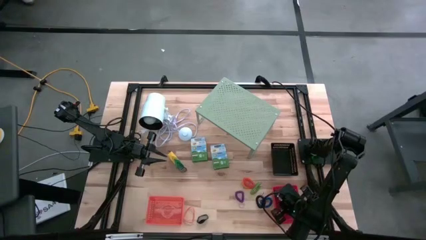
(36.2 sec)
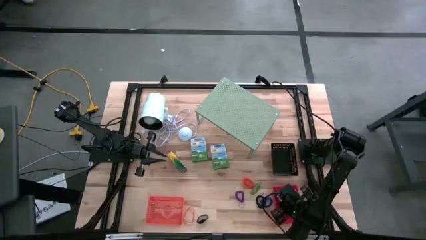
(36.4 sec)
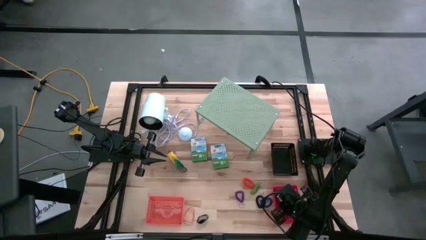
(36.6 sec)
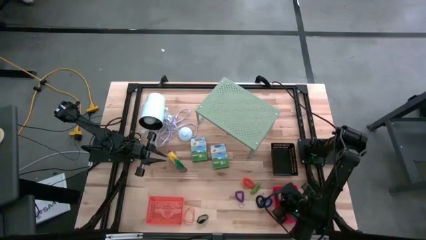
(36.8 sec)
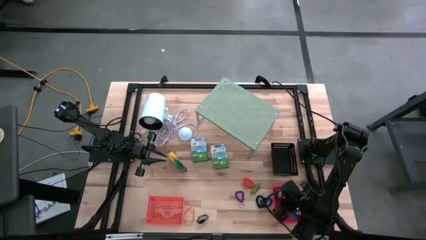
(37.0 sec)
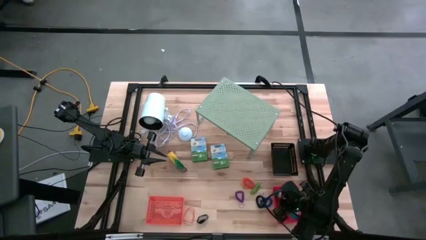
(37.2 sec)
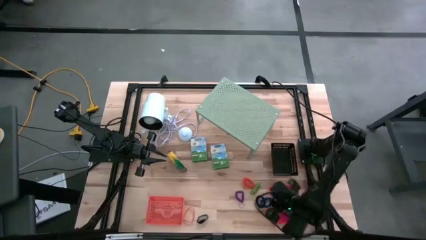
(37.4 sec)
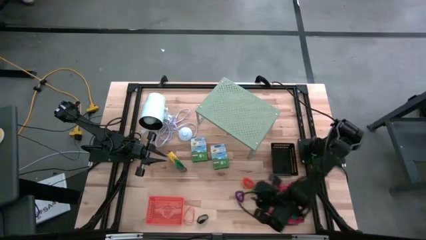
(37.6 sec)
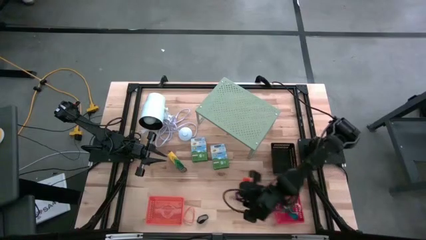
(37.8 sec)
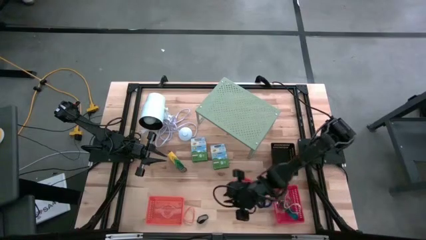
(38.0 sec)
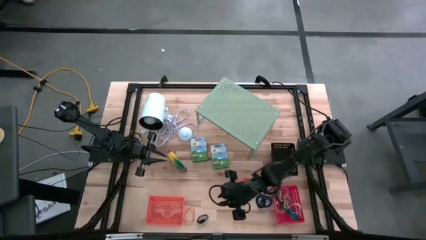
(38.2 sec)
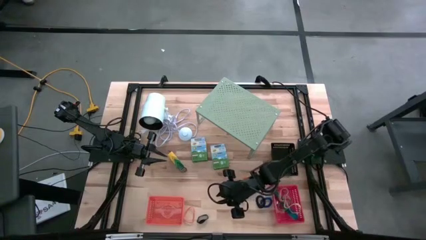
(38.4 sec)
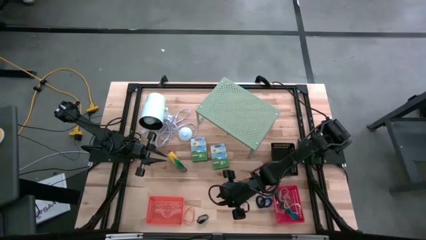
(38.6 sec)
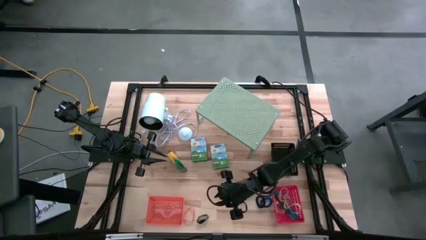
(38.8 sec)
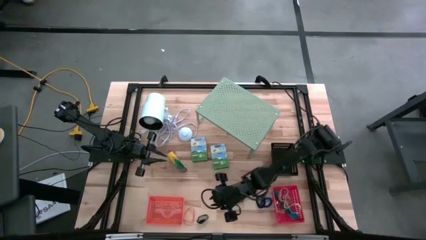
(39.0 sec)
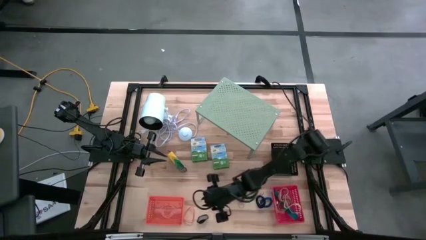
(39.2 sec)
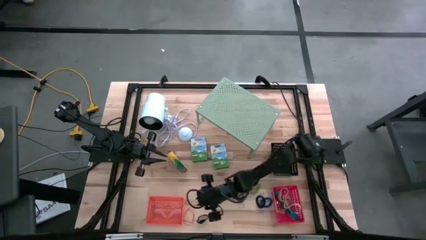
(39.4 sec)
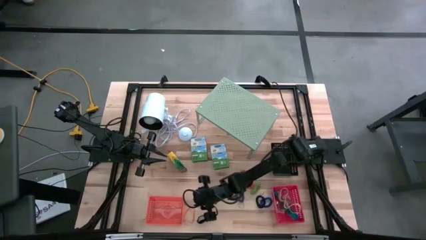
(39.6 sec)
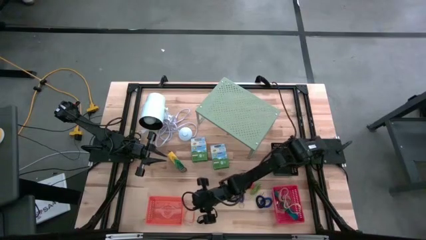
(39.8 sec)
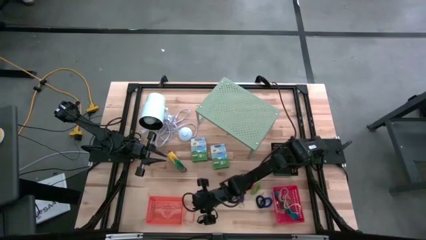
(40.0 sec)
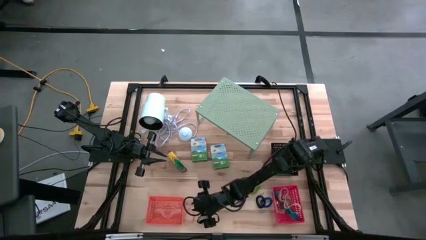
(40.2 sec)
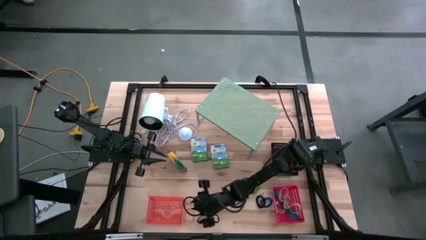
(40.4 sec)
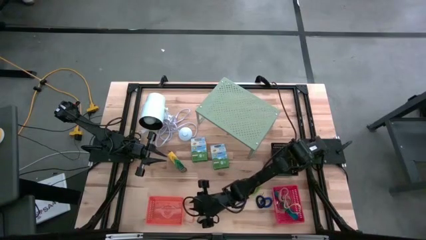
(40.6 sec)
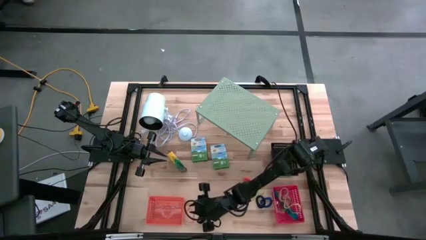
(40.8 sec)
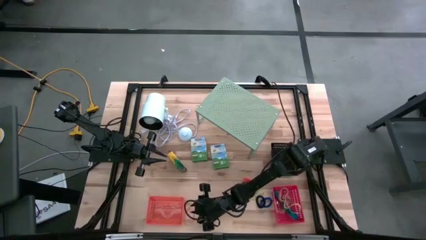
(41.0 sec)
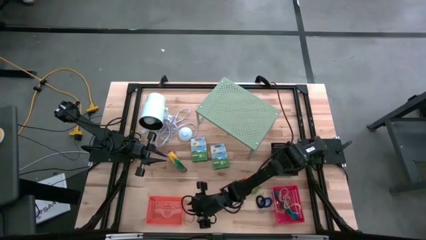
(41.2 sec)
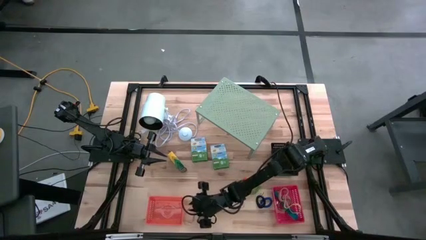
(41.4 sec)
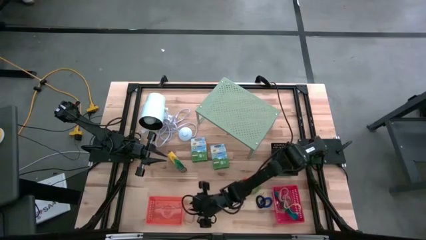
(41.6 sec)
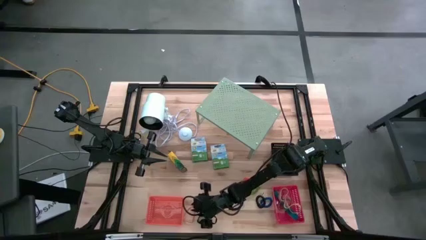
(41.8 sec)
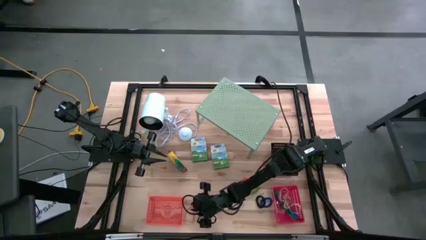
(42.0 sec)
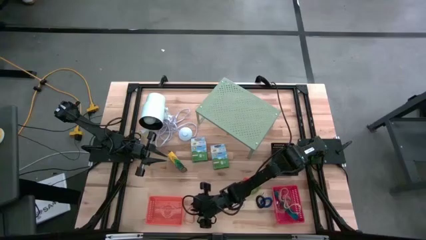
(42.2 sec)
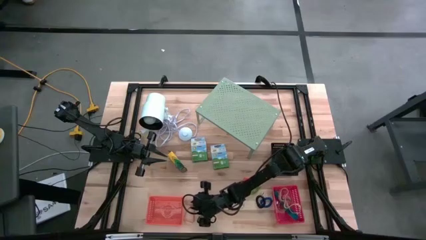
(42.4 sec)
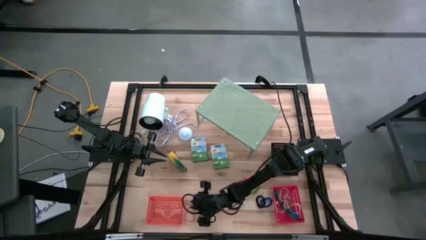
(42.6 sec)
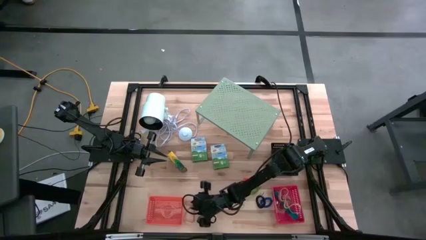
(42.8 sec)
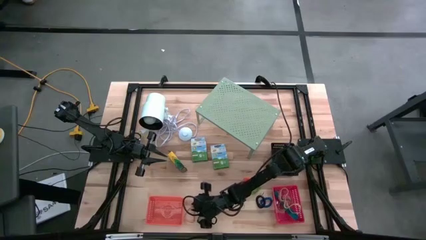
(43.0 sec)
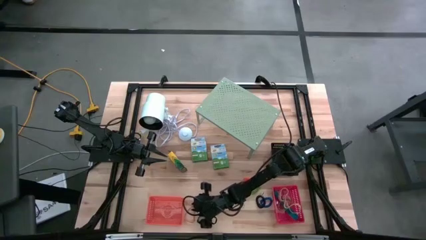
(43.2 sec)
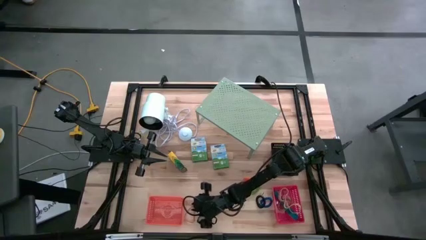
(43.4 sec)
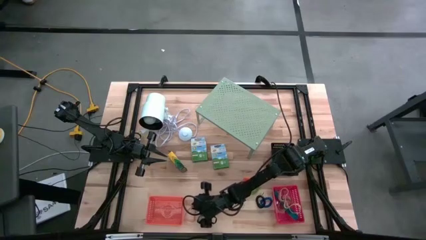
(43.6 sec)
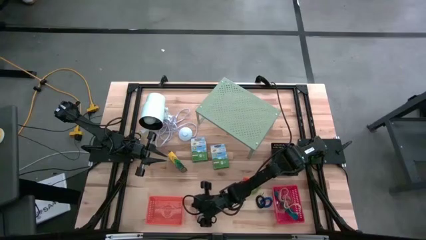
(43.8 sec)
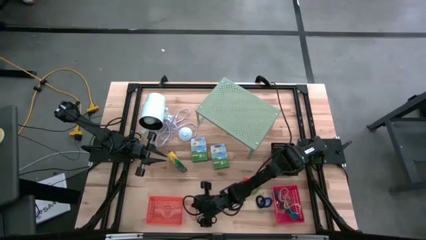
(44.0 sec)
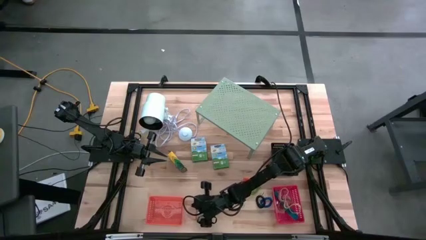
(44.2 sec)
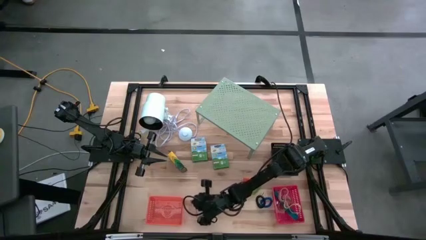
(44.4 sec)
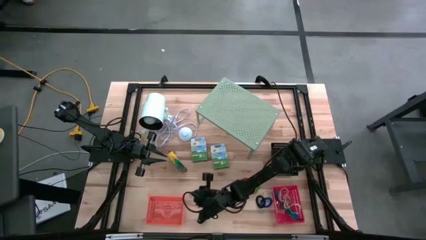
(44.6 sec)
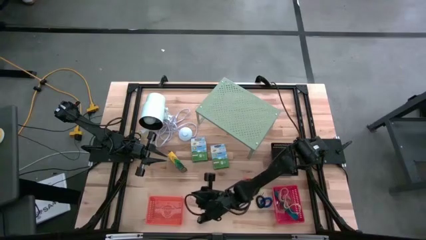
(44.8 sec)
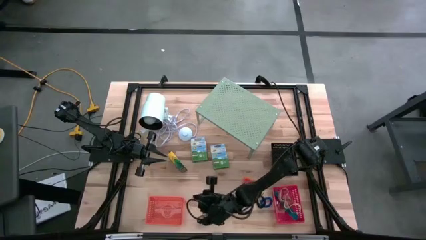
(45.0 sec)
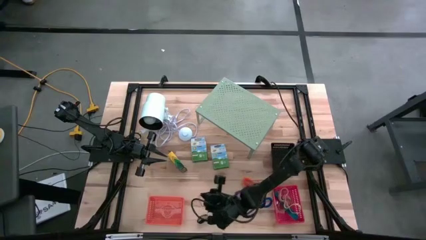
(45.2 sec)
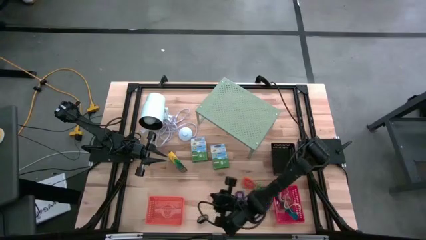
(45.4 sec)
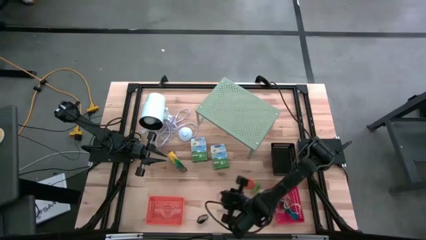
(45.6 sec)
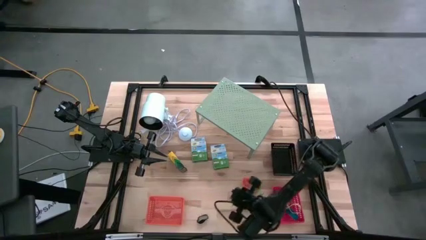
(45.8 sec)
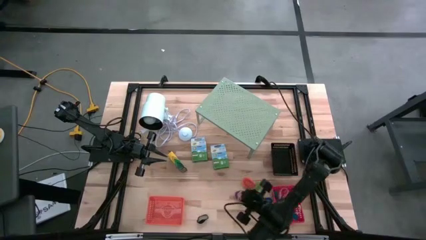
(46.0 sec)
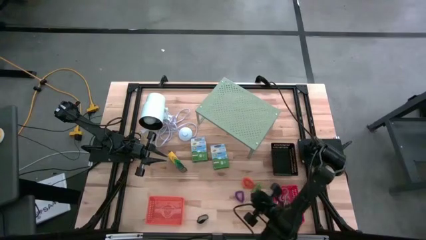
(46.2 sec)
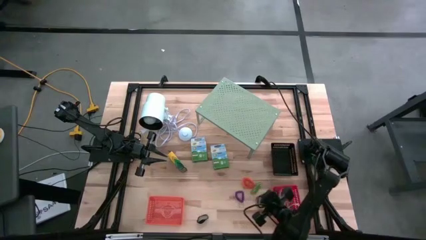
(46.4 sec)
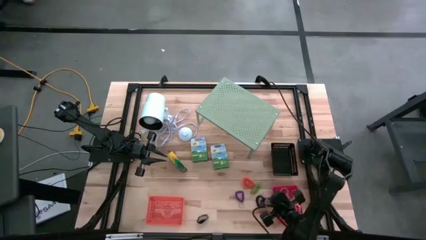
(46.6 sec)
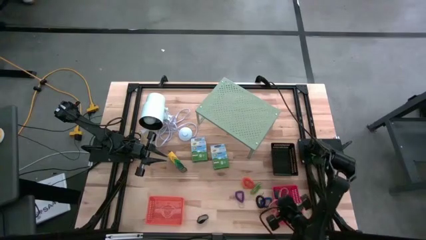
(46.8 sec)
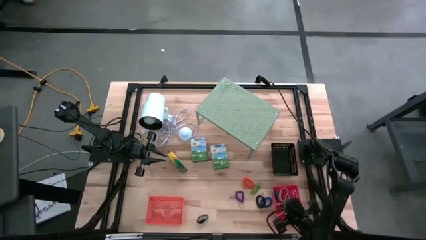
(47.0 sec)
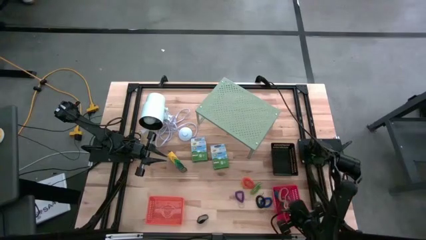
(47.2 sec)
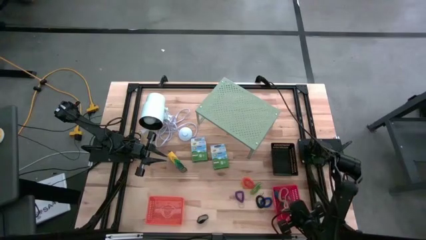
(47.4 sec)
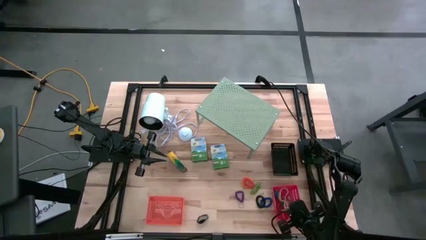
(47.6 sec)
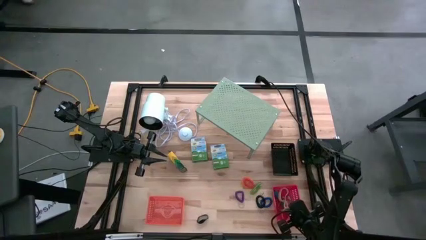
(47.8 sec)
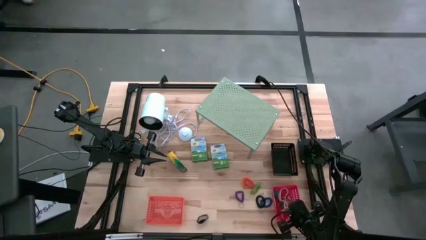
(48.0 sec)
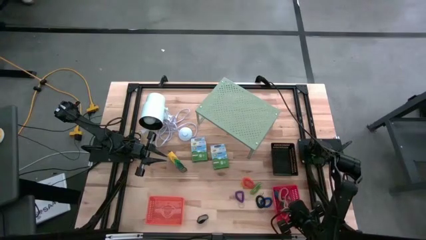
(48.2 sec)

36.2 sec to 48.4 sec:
Task: Pick & Place Office Desk Supplies
Put the orange rubber band into the red bin
